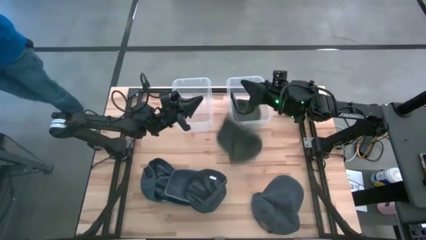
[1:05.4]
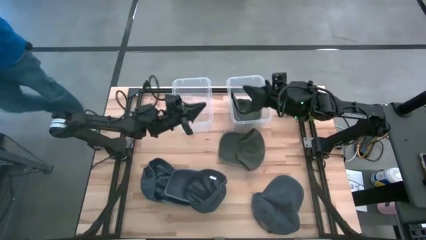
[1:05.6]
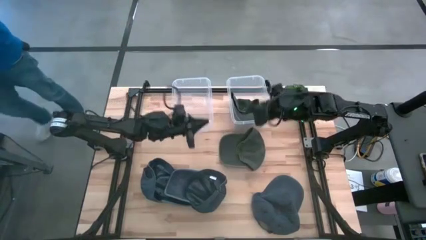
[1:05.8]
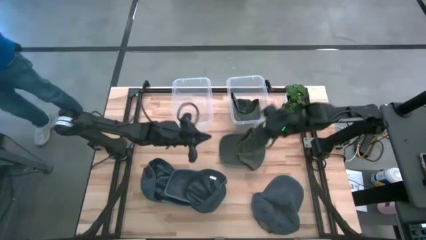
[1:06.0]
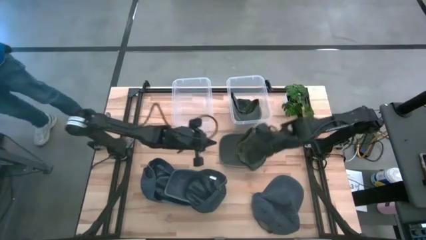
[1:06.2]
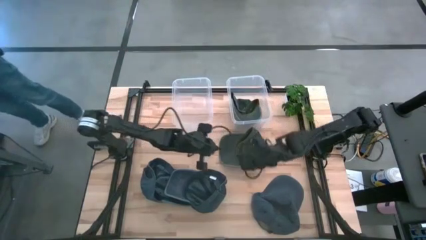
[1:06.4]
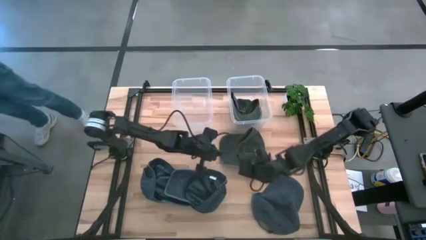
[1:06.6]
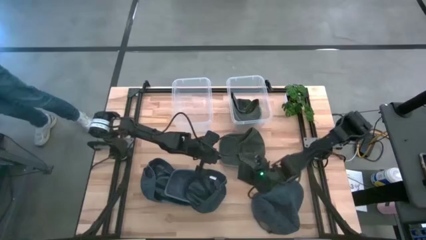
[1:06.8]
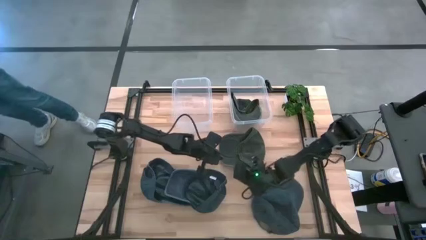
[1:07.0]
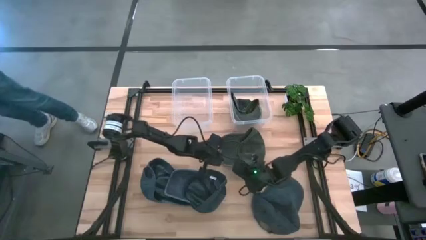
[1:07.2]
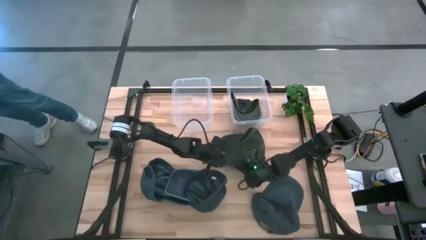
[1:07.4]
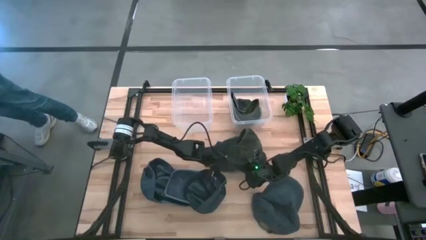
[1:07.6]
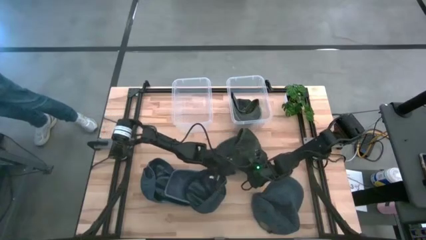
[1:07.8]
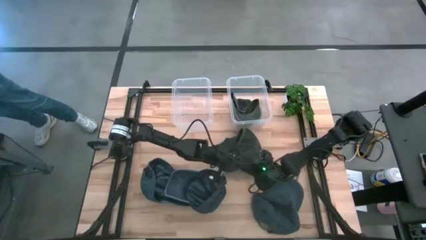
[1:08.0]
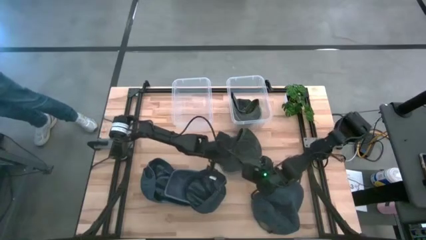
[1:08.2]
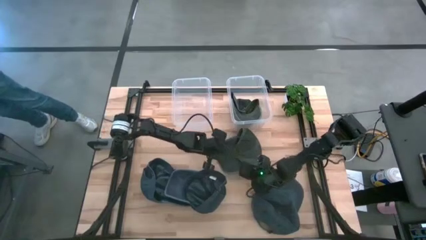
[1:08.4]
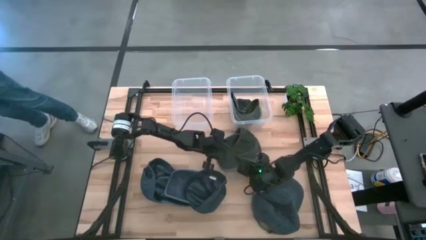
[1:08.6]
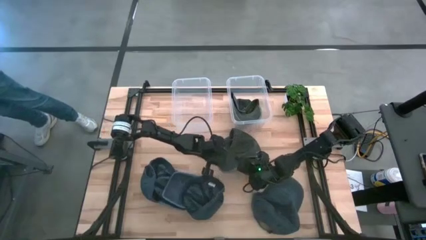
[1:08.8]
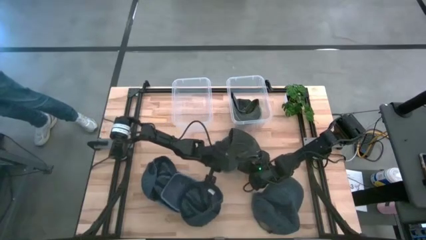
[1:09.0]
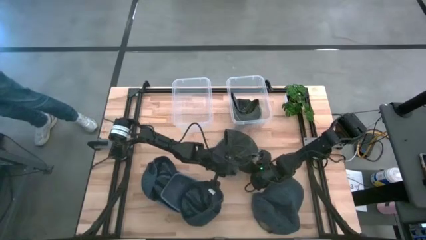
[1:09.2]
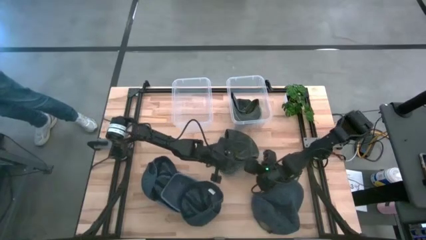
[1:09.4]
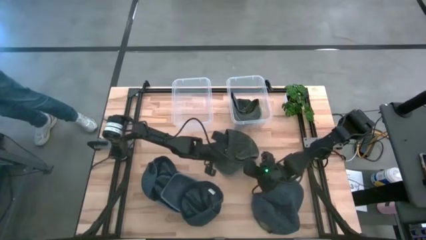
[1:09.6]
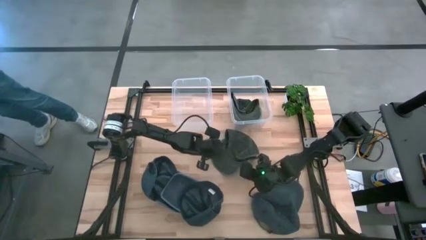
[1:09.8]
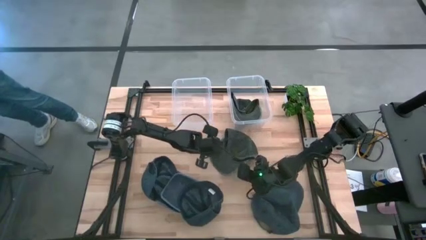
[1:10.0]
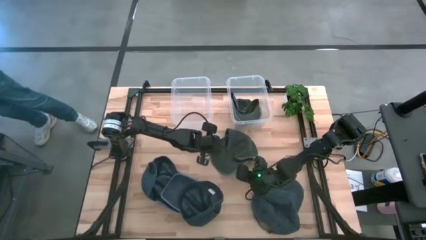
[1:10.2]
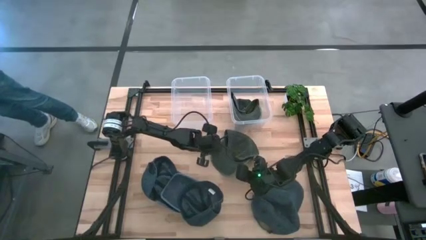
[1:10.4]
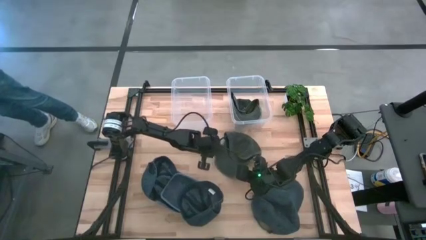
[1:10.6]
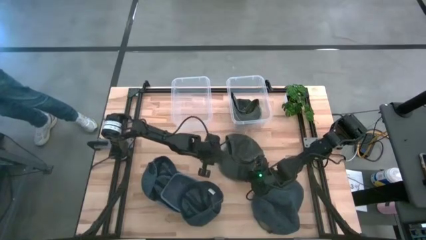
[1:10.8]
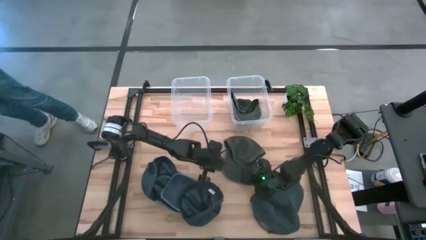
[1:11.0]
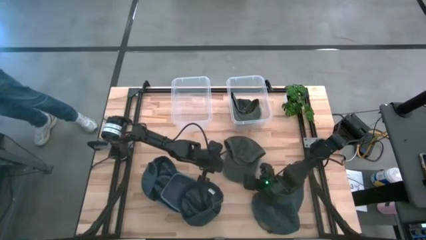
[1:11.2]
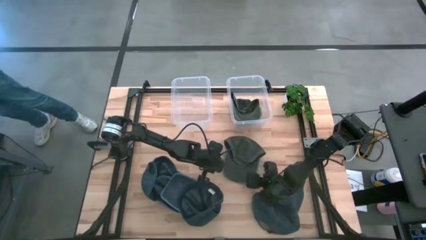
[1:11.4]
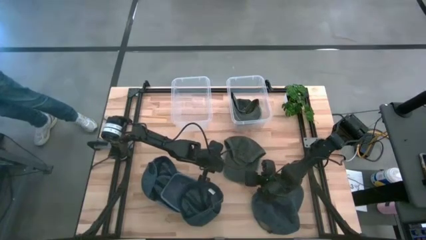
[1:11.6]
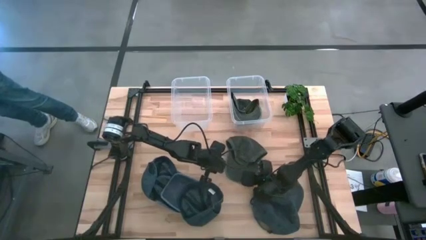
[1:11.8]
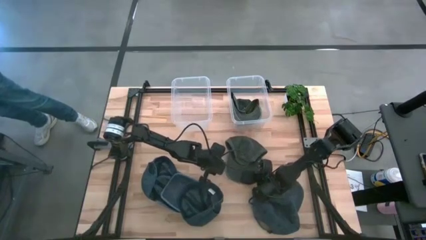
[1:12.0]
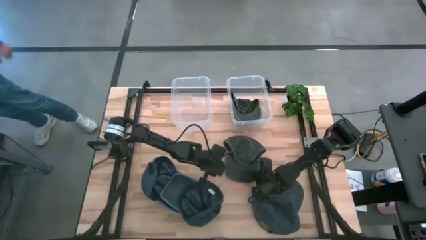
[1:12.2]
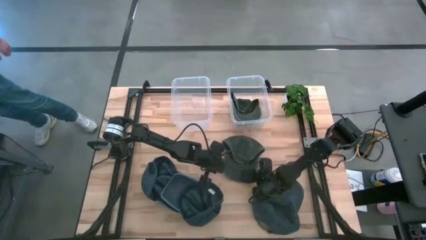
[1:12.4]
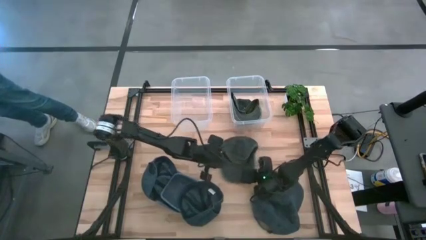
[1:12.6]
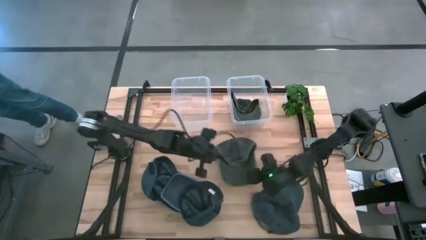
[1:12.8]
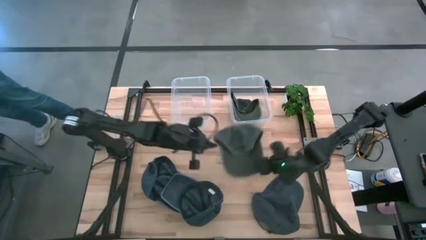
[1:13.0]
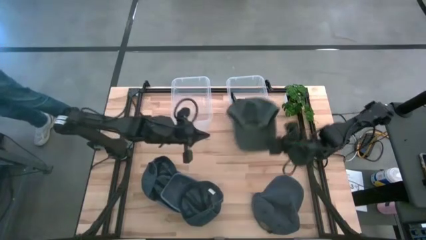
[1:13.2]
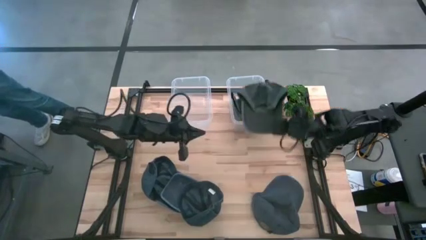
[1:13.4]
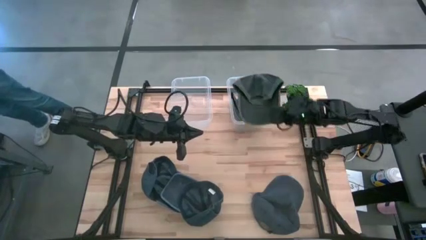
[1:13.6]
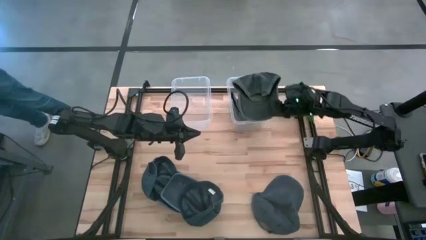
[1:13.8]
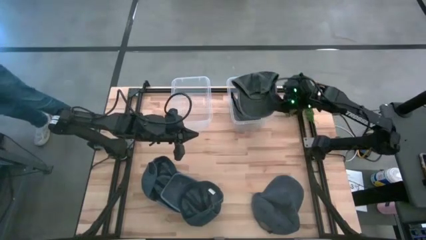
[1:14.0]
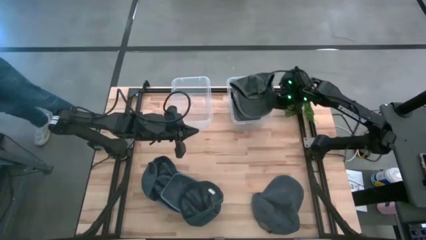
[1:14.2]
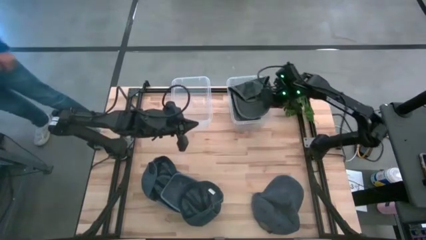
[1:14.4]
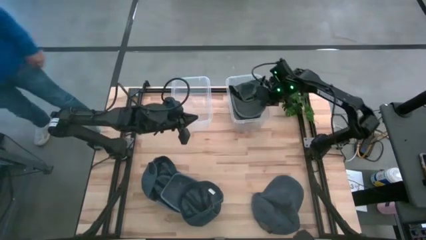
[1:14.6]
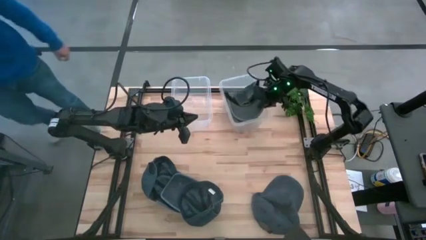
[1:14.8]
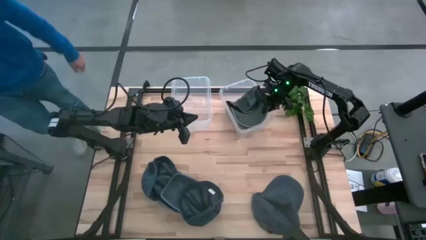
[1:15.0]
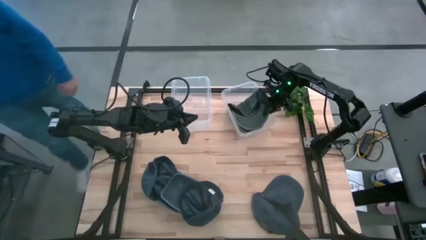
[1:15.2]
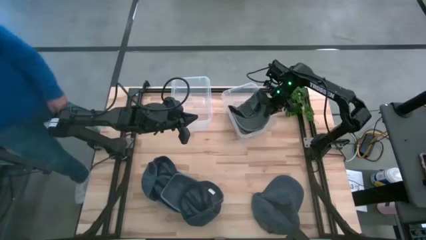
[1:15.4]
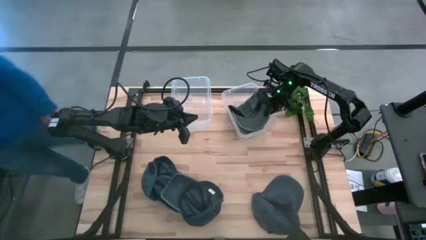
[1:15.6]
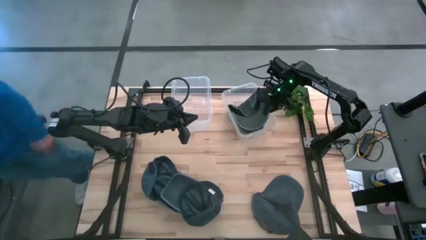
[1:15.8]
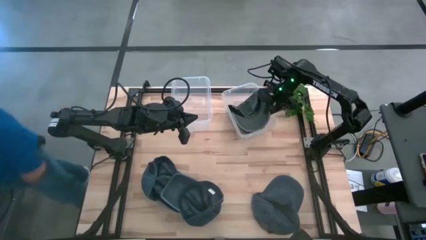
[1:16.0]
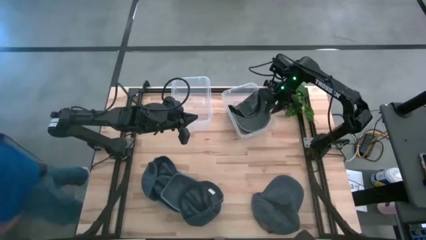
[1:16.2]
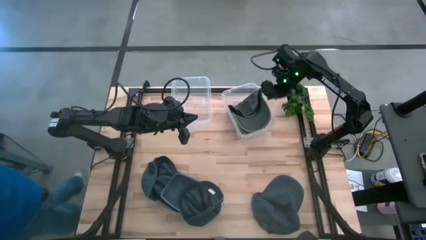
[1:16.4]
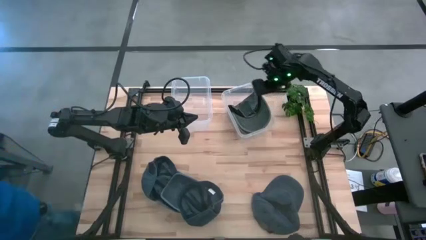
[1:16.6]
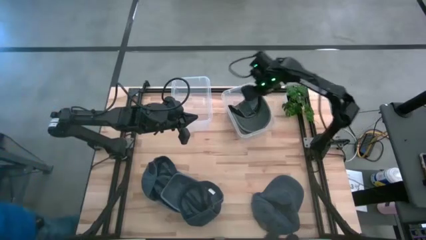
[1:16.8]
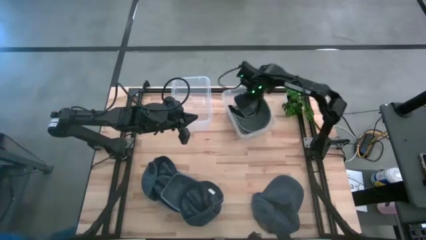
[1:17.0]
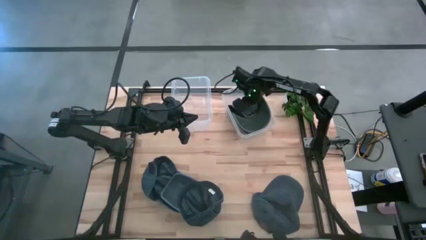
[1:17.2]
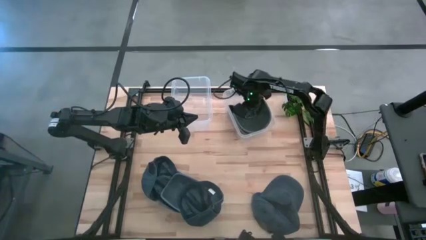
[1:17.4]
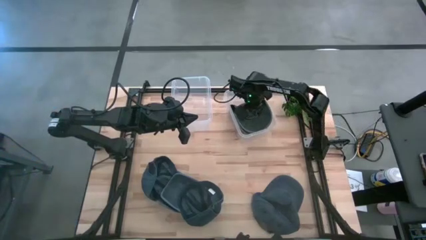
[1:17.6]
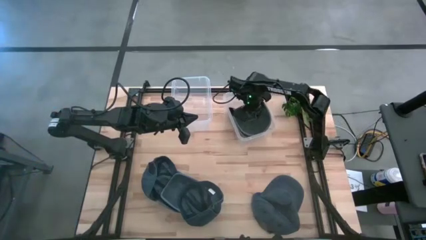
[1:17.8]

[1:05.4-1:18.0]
Task: Pick & Place hat
Put the gray cap into the right bin

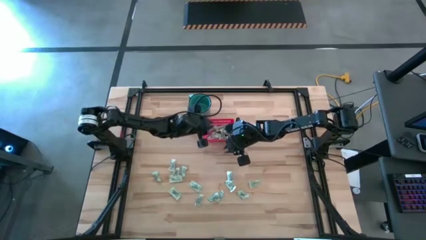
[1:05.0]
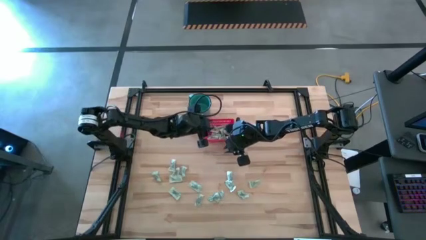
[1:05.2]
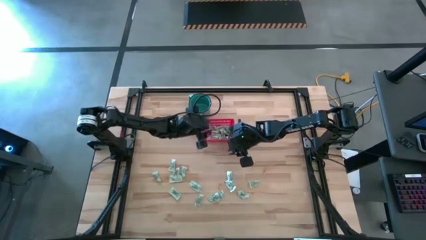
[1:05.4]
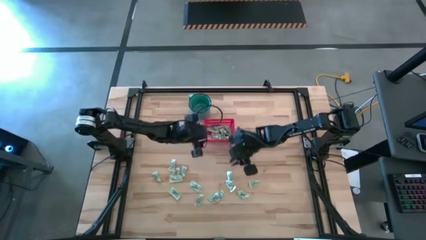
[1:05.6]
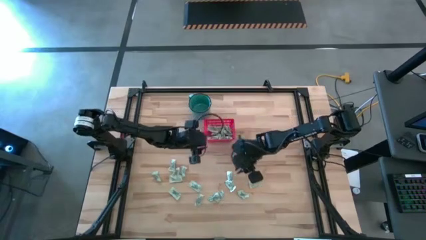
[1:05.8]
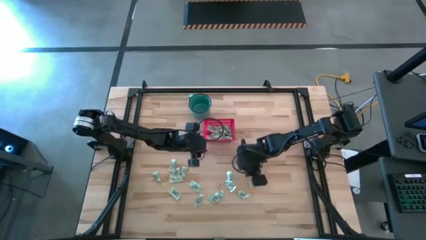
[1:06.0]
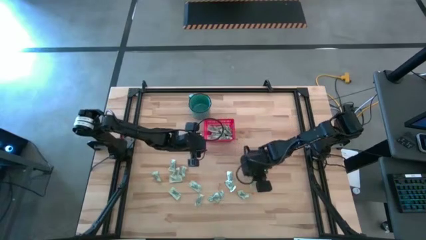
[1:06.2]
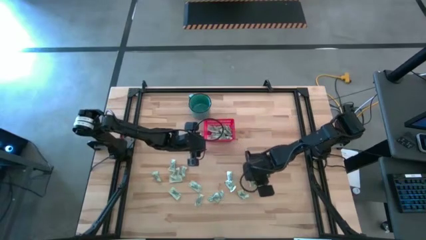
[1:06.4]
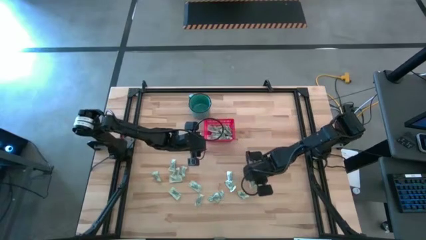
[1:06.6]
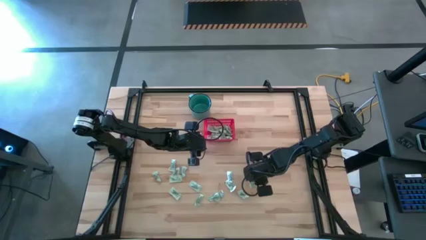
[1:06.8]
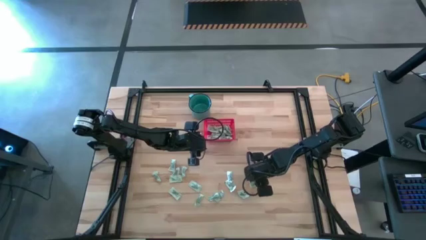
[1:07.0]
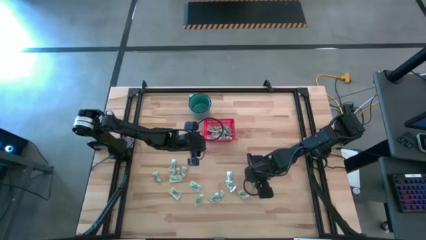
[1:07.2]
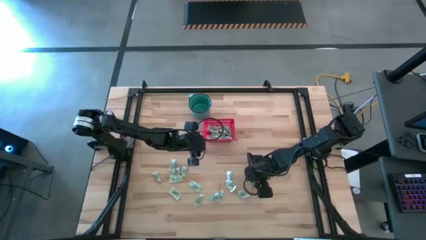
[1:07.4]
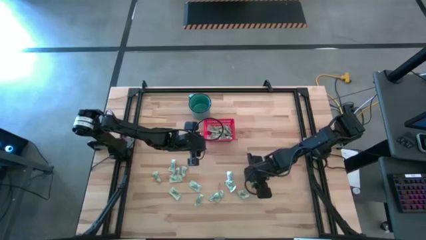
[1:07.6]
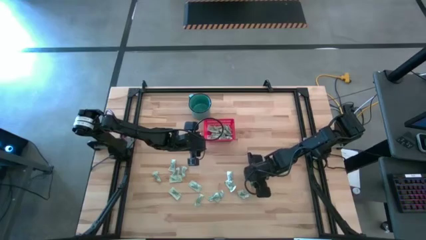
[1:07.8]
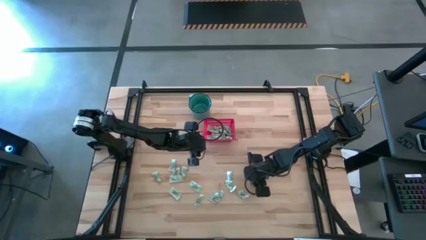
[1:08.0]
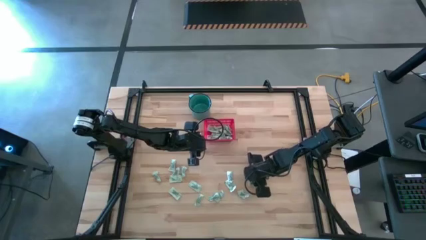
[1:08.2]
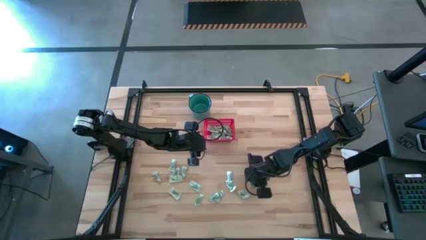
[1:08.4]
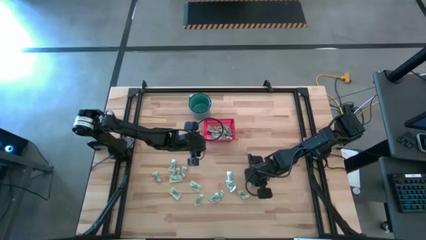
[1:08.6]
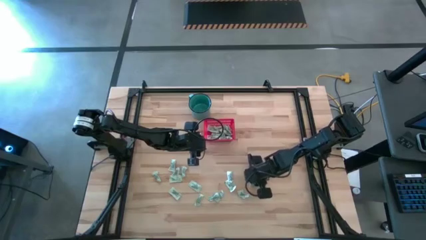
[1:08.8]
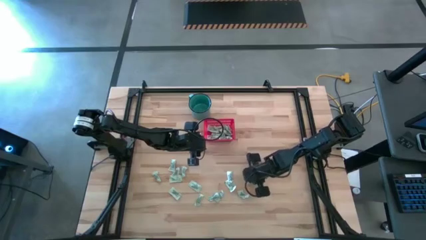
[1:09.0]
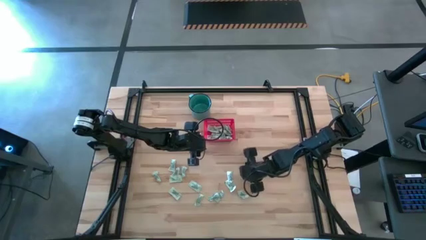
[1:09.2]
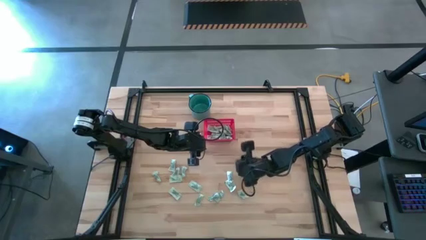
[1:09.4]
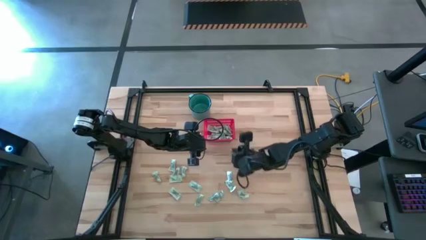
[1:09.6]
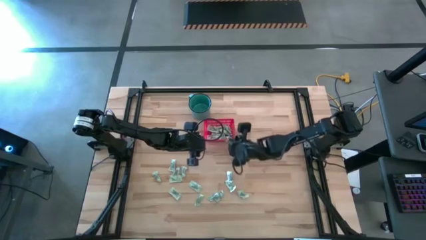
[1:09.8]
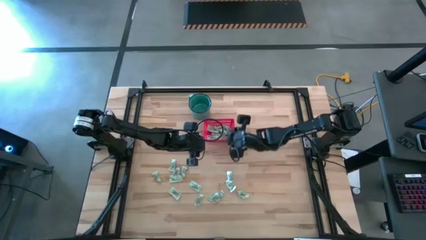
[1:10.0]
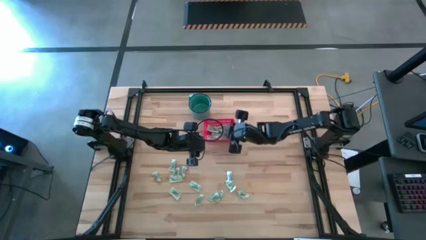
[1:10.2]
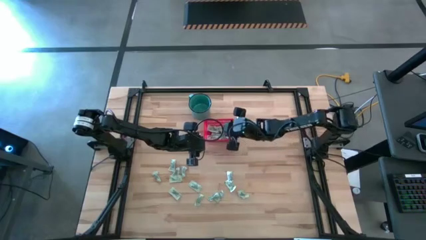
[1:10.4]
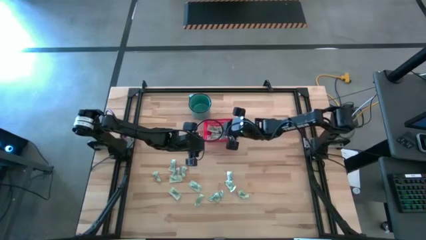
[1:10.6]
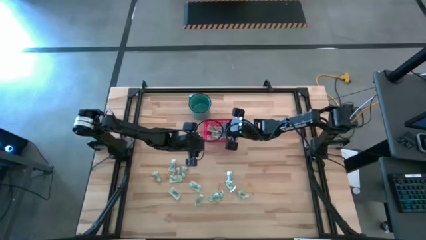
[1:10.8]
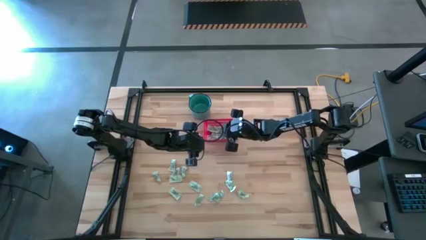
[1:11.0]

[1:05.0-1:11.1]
Task: Pick and place items into bin
Put the light green stevia packet into the red bin
